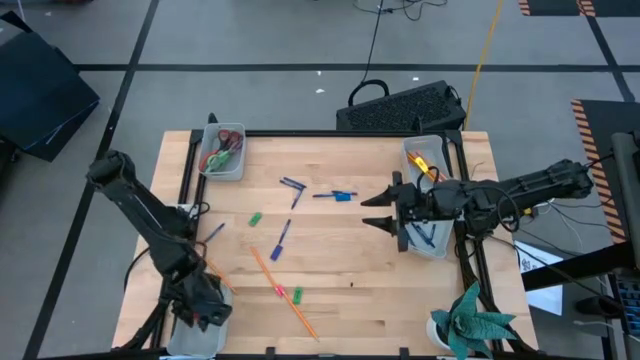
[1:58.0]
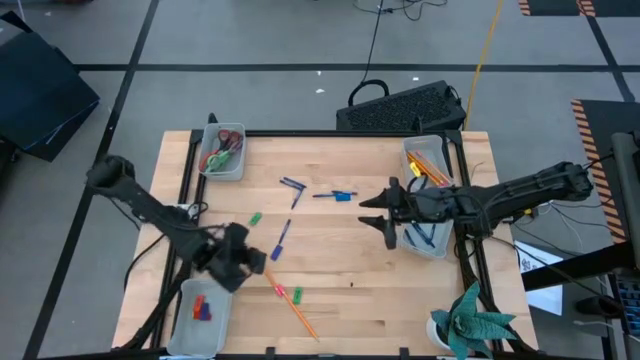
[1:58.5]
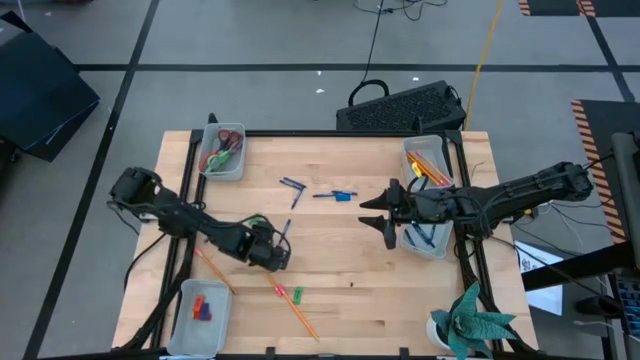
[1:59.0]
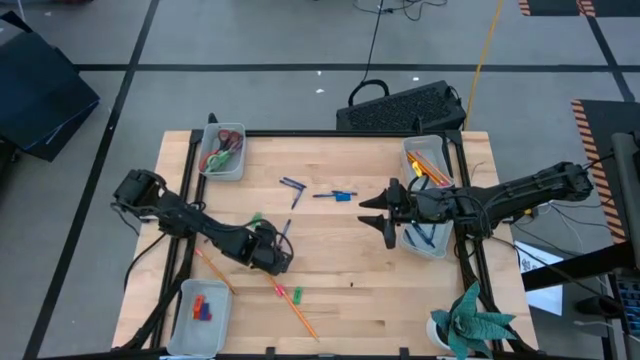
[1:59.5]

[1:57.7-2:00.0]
Task: Sort crayons/erasers/pens/pencils in bins
Put the violet eraser into the bottom left gray bin

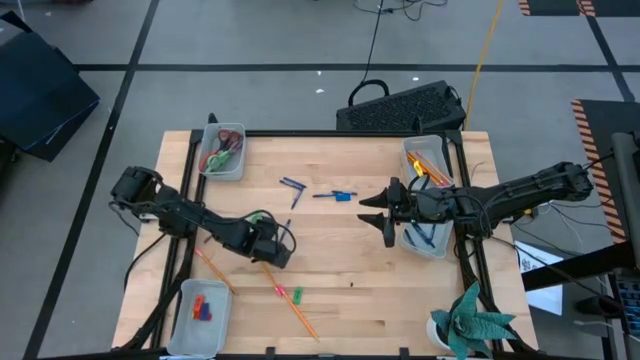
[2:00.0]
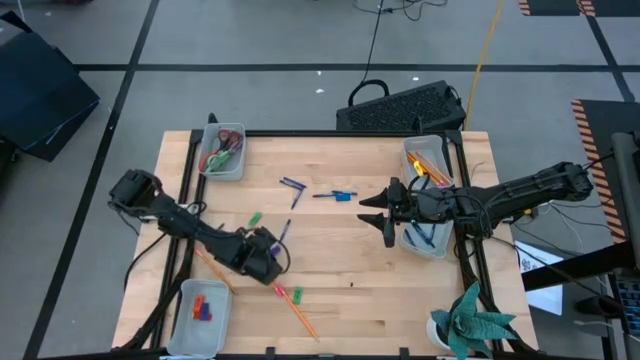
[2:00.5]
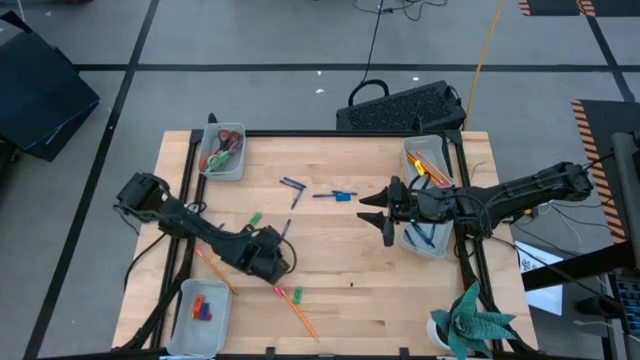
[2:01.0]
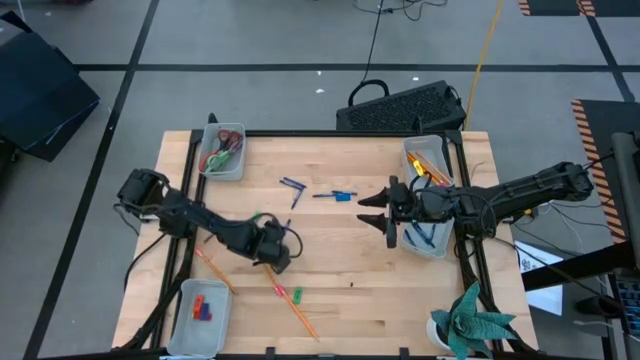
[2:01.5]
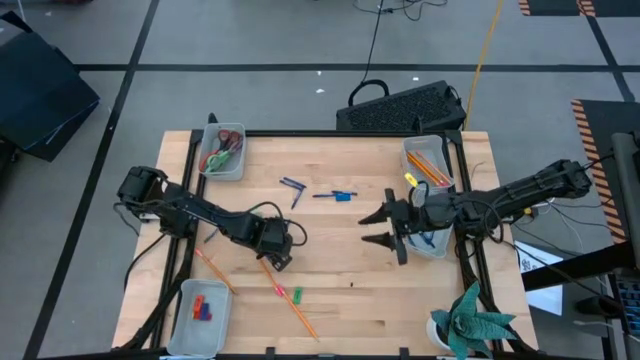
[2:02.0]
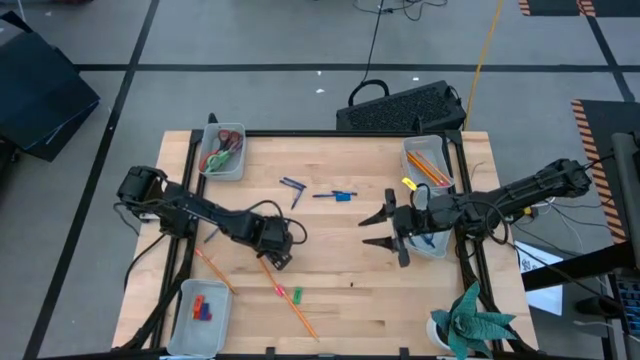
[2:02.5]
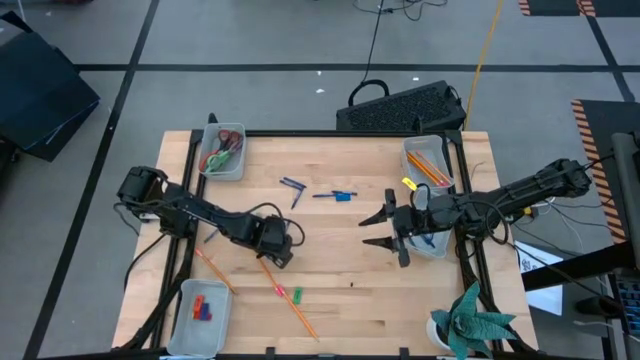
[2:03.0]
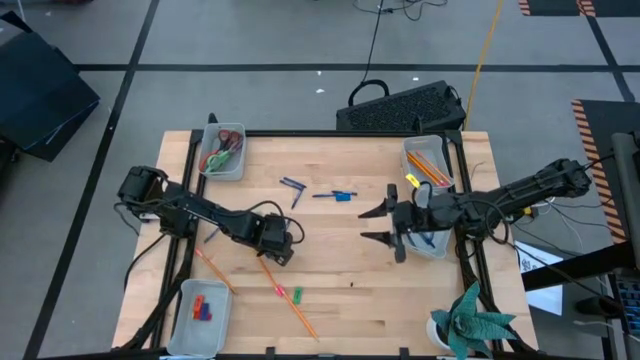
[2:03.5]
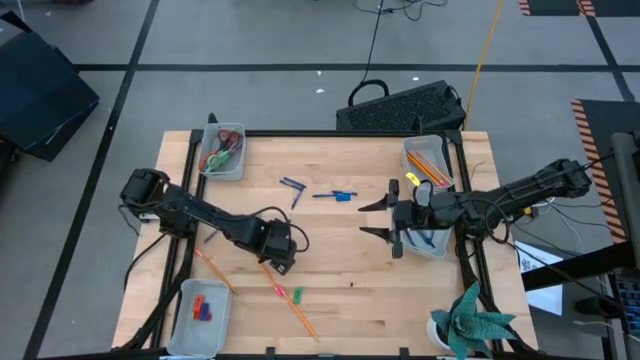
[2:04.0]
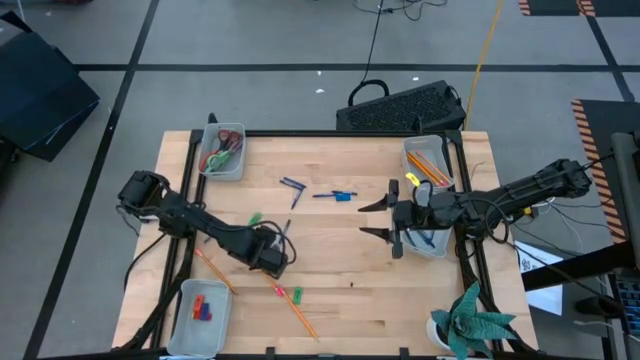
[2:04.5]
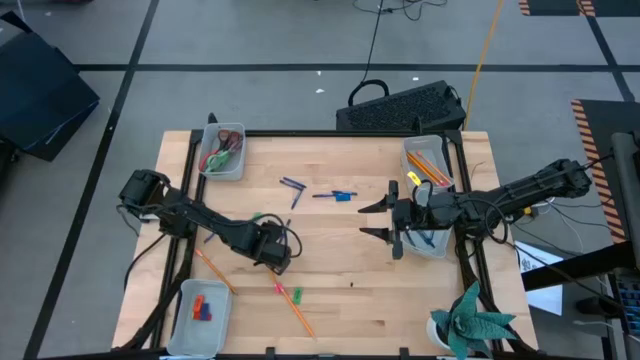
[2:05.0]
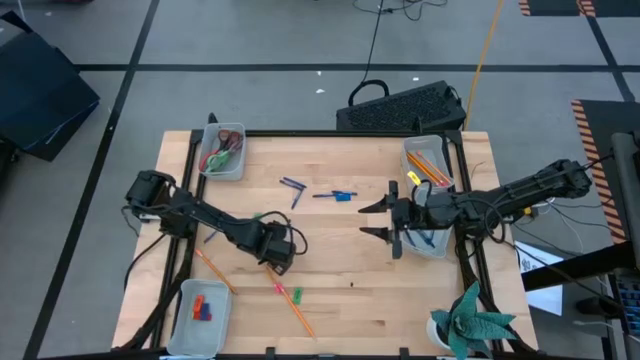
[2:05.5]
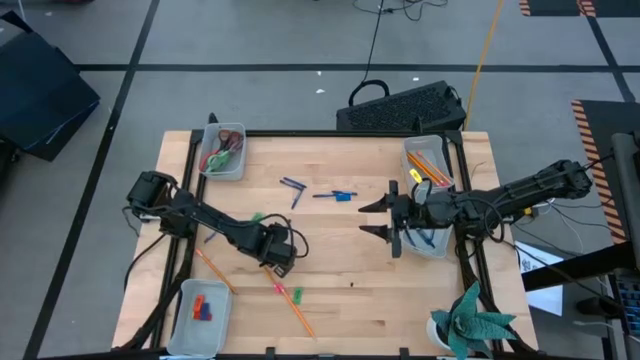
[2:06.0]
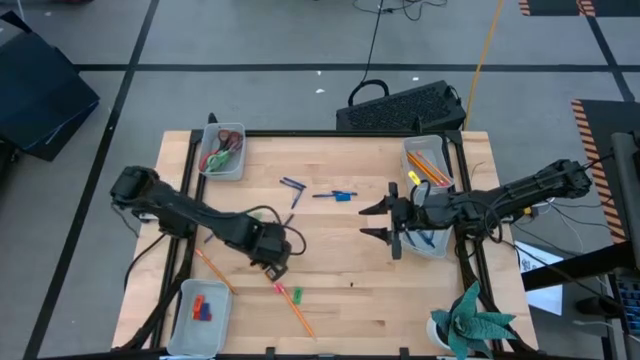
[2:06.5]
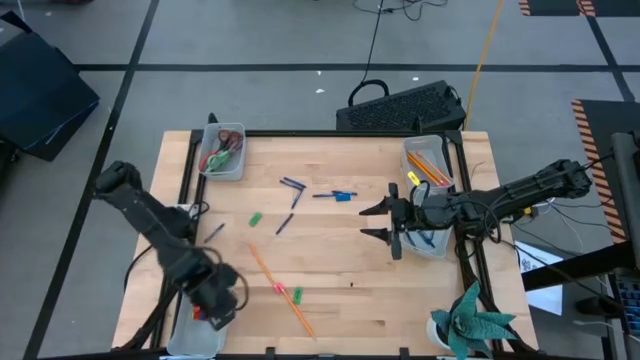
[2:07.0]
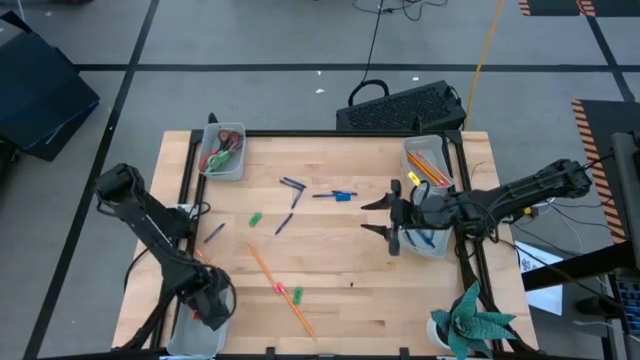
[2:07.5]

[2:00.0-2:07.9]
Put the violet eraser into the bottom left gray bin

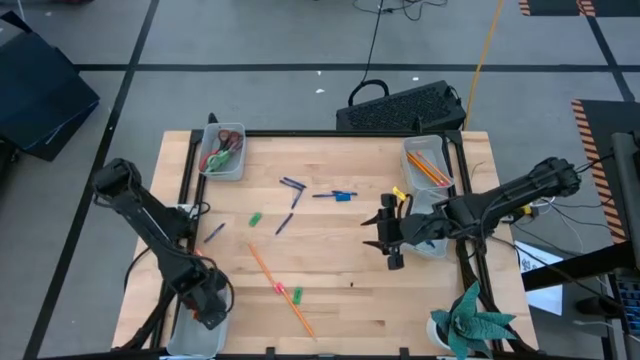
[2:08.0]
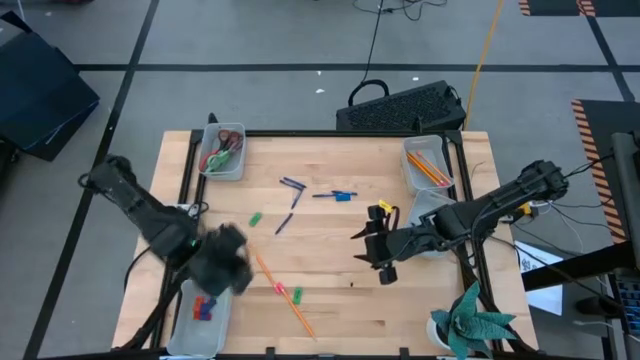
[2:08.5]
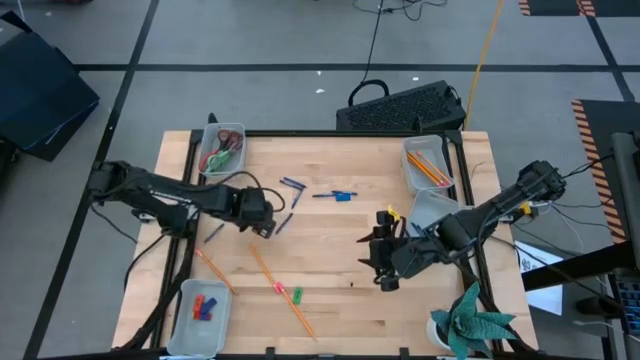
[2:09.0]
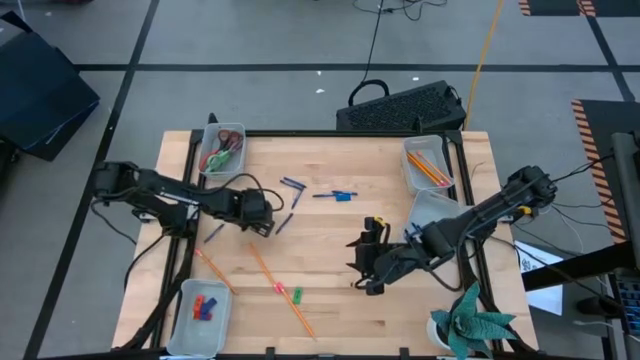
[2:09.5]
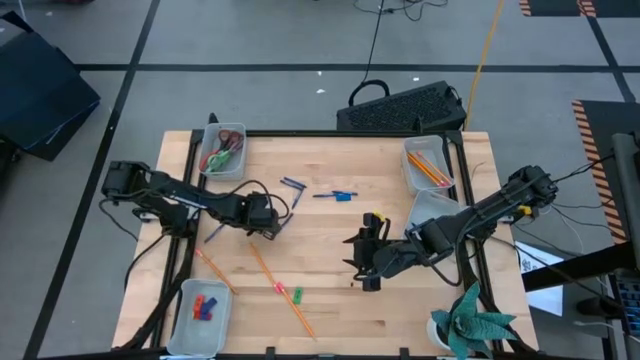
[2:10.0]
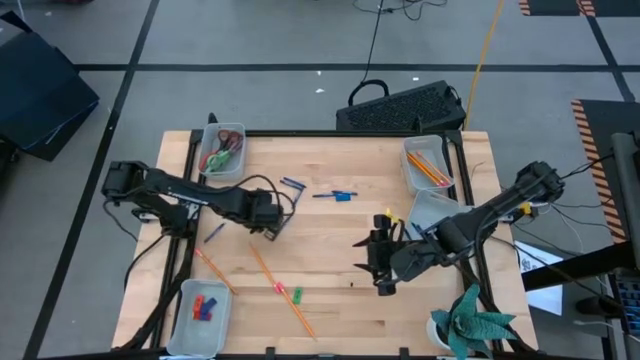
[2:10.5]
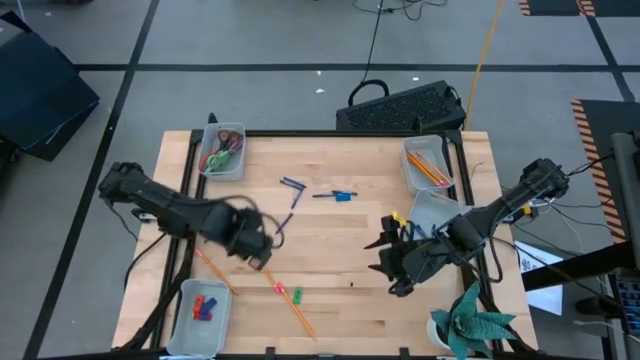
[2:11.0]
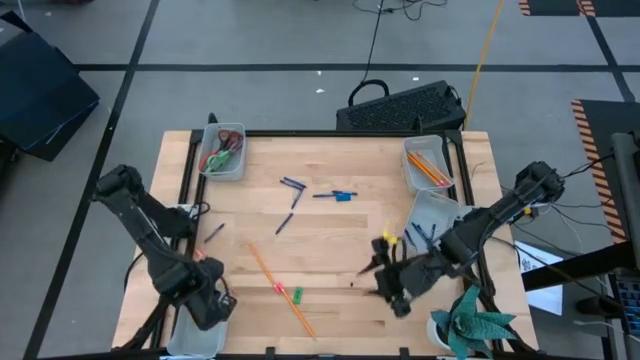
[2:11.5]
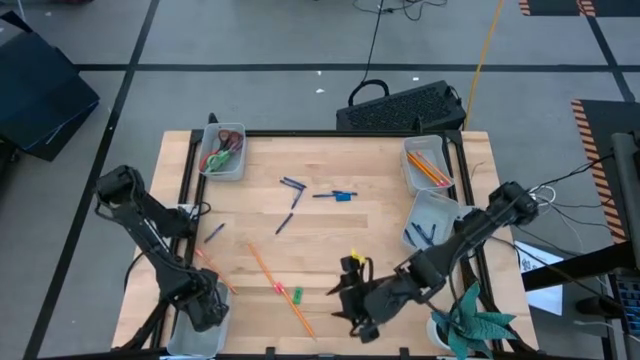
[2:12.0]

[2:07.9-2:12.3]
Put the green eraser into the bottom left gray bin

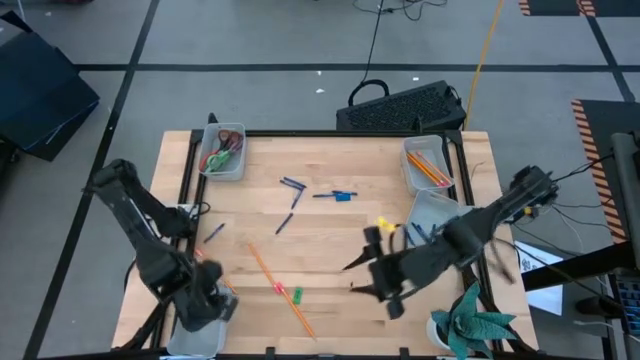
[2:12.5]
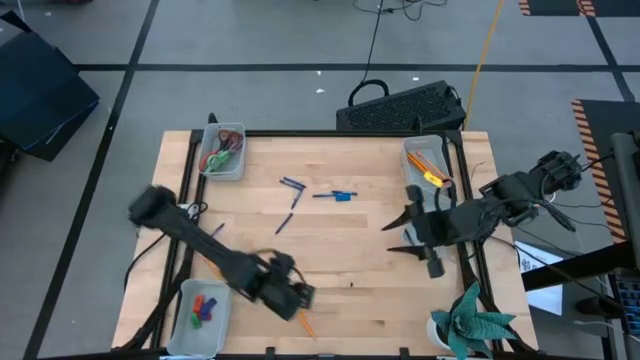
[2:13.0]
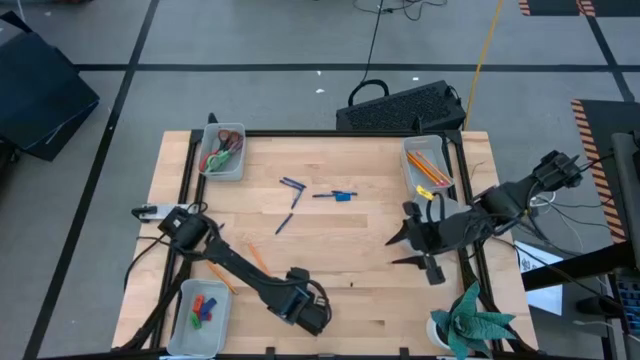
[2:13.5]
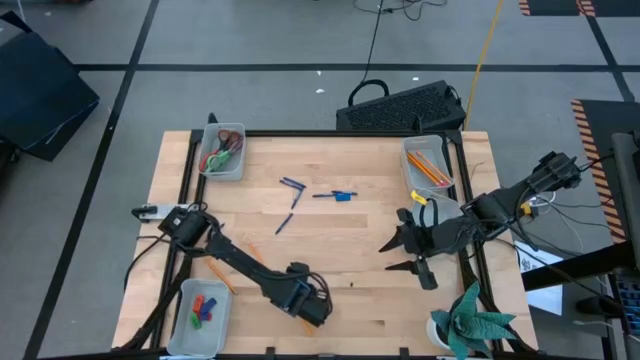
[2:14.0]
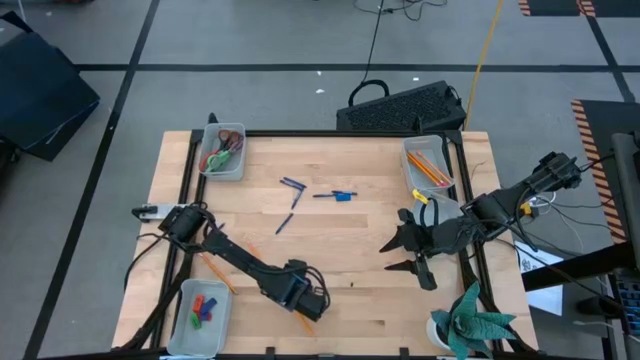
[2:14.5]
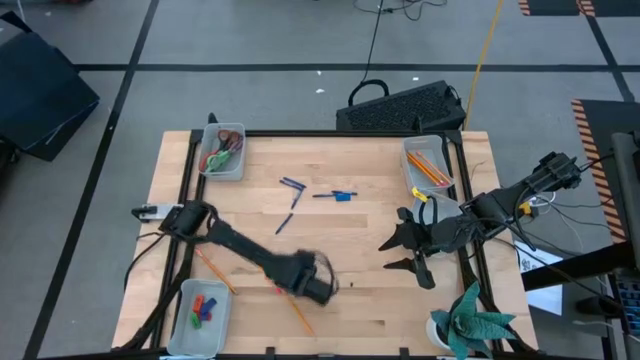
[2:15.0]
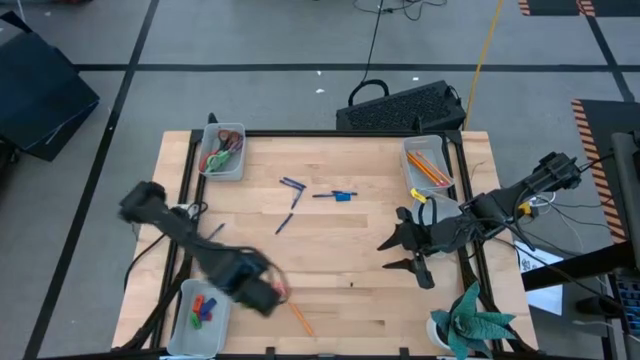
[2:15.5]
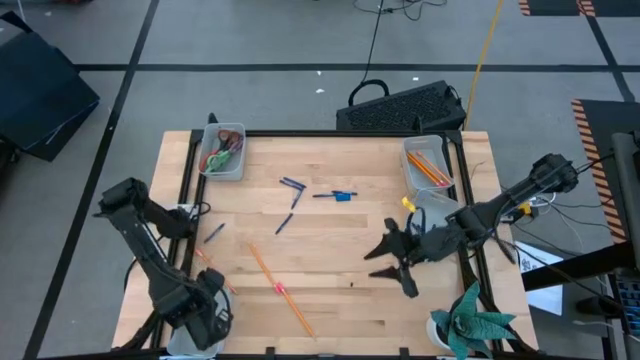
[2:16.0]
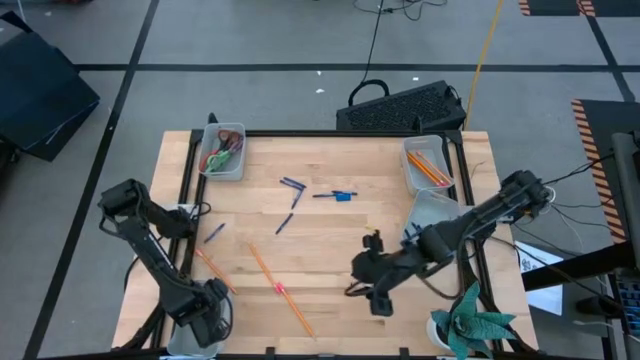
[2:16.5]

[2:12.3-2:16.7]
Put the green eraser into the bottom left gray bin
